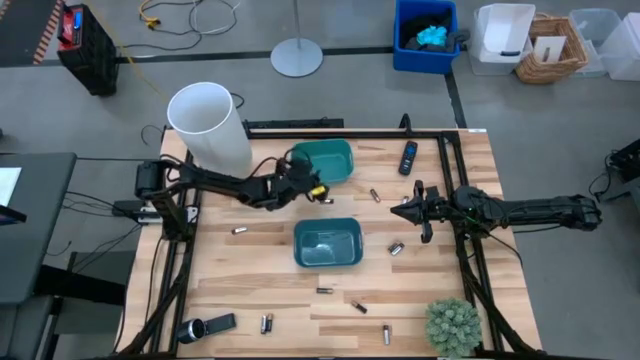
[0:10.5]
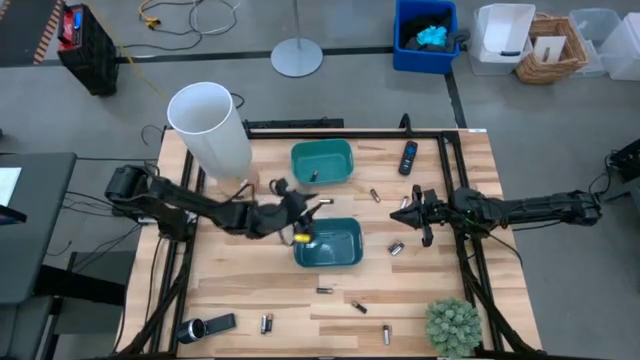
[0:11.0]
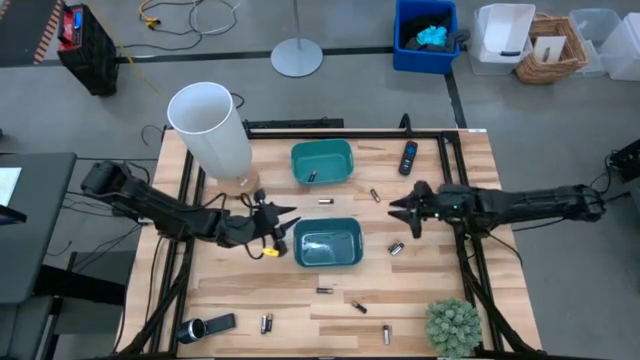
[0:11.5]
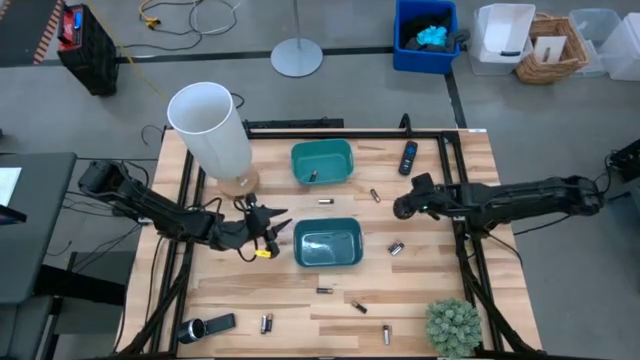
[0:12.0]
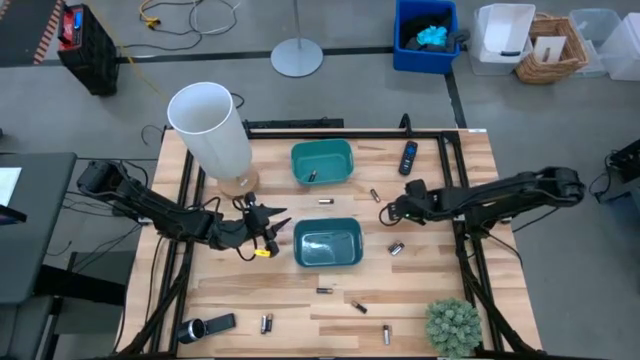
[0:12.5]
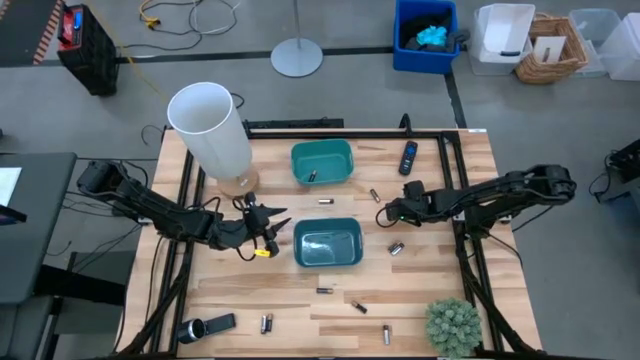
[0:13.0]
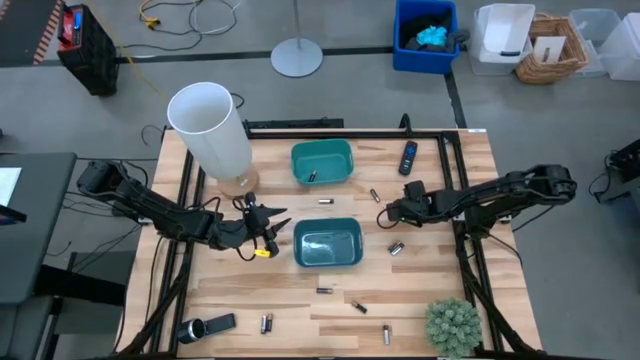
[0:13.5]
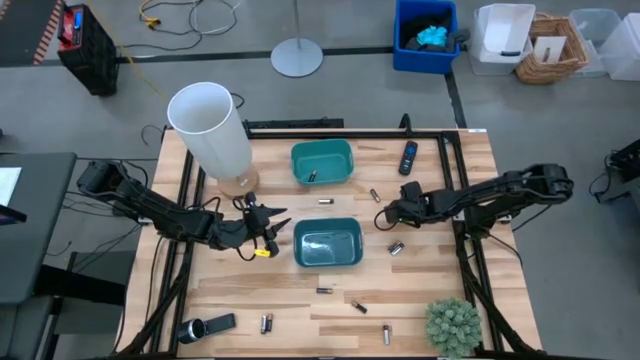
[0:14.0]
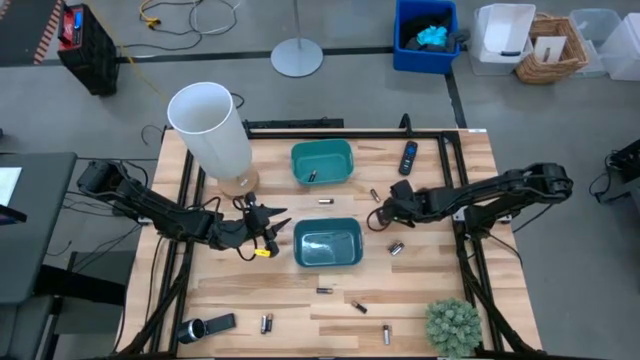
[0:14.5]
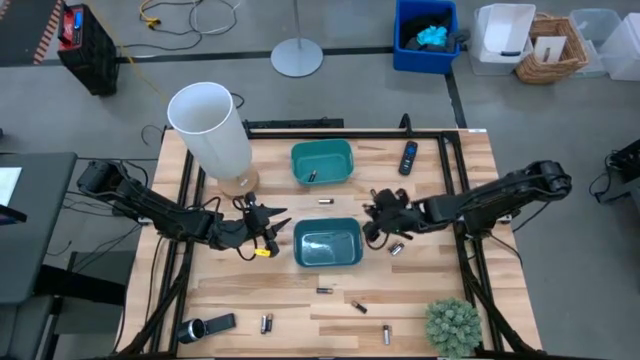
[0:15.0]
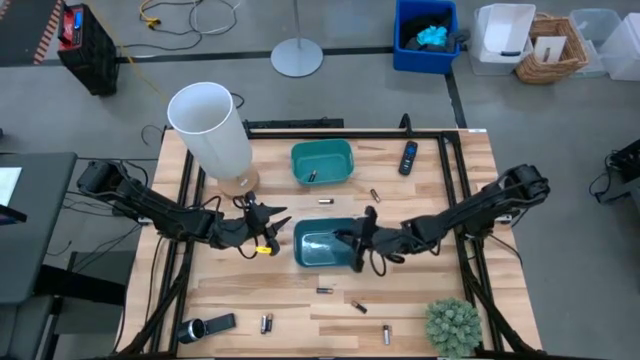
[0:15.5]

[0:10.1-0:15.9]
Task: Sort batteries
Put the silver battery into the blue bin

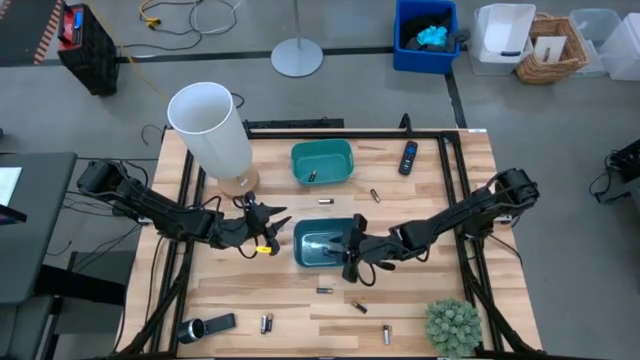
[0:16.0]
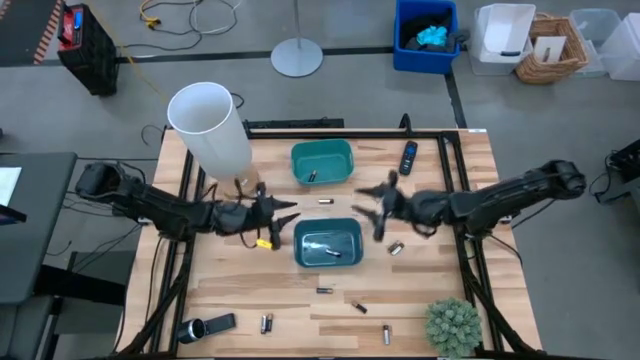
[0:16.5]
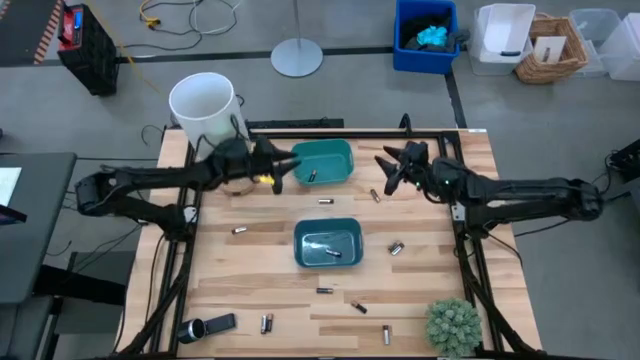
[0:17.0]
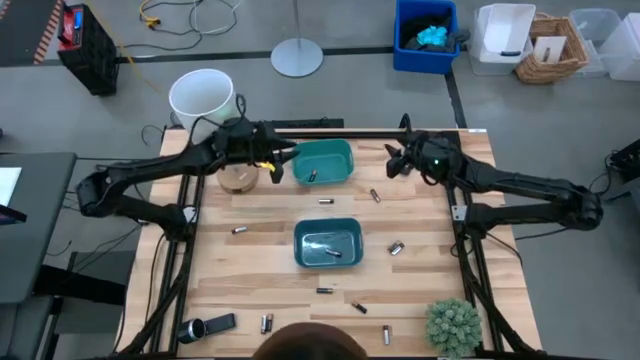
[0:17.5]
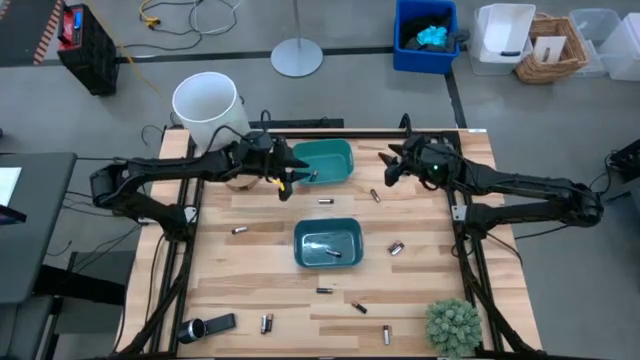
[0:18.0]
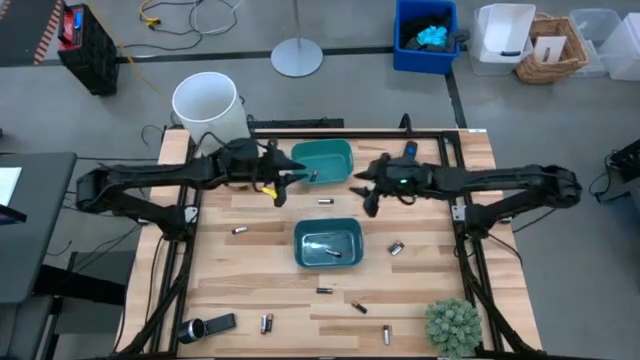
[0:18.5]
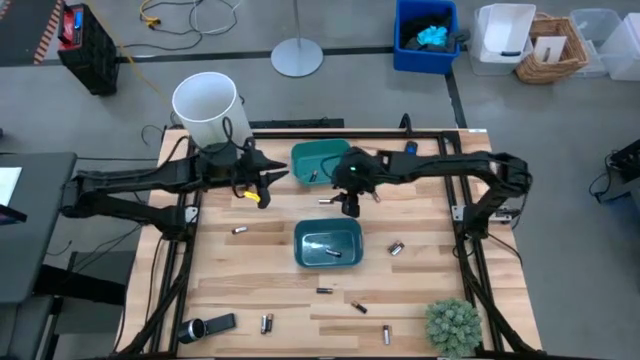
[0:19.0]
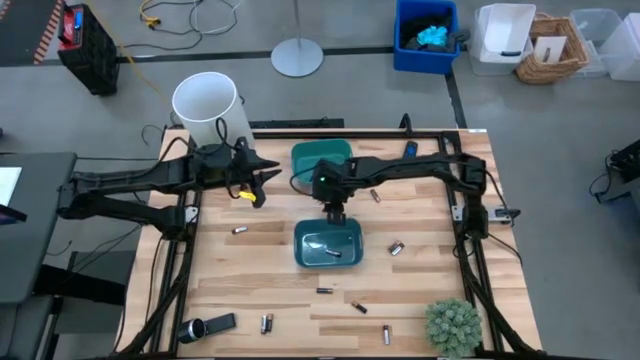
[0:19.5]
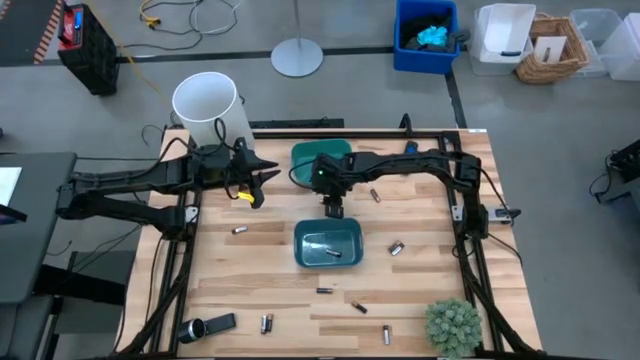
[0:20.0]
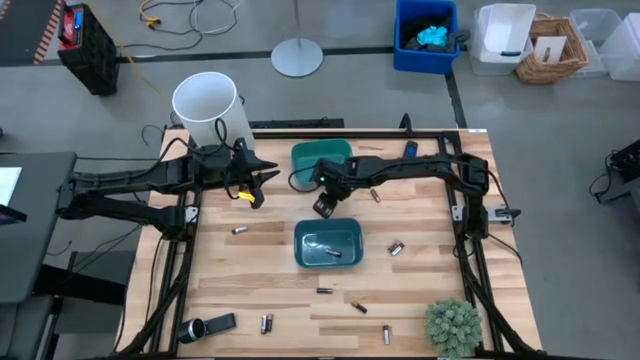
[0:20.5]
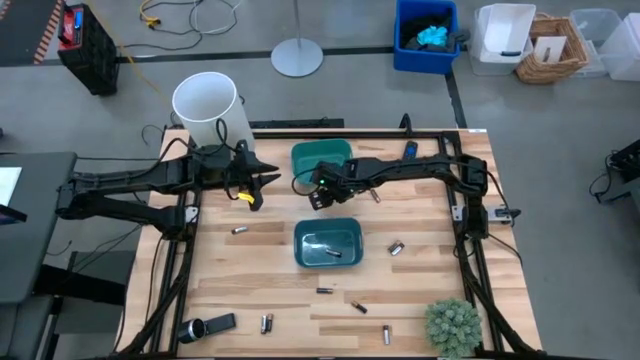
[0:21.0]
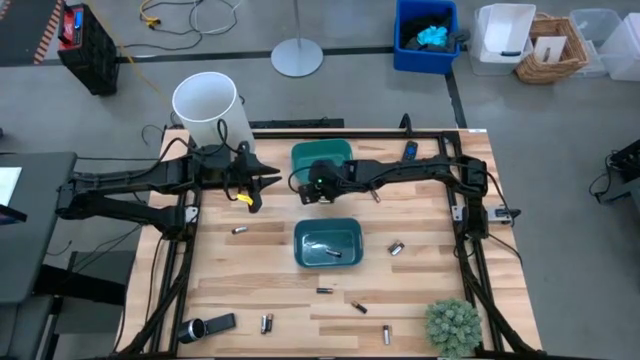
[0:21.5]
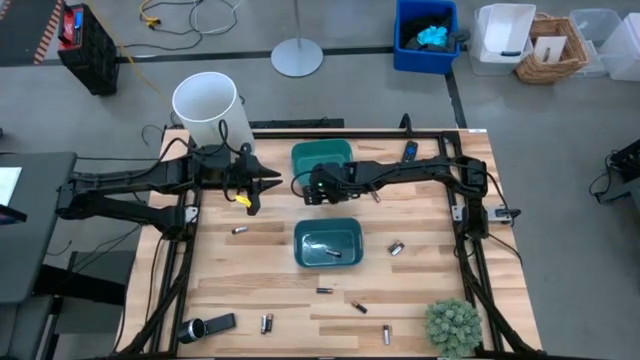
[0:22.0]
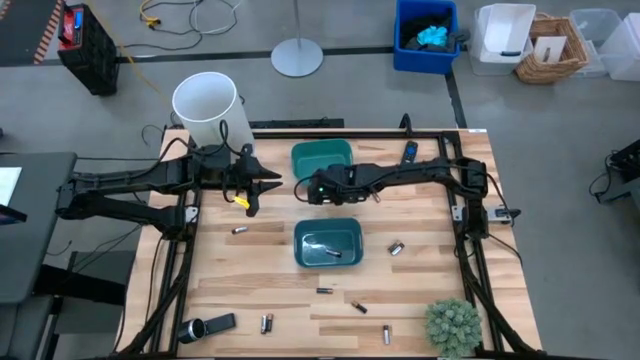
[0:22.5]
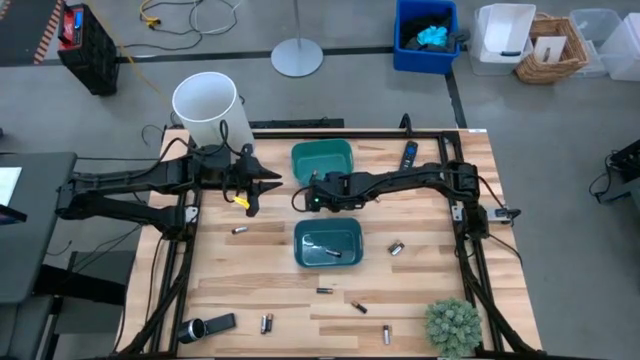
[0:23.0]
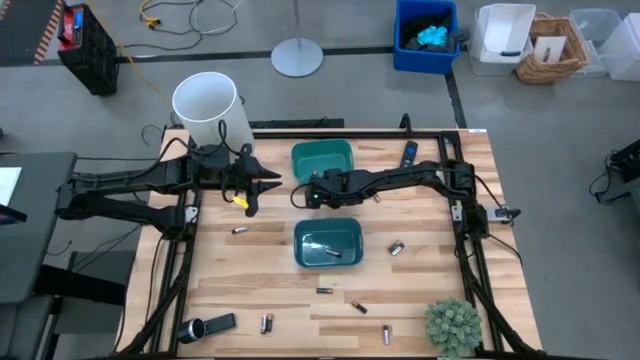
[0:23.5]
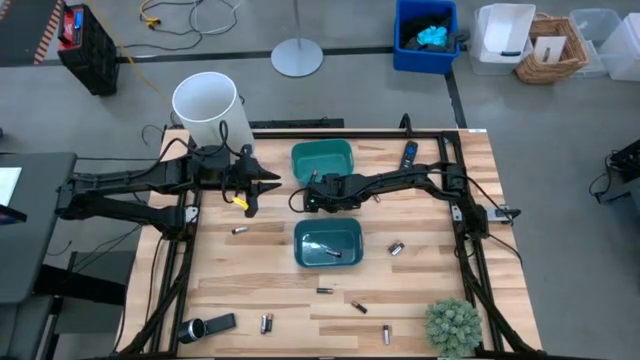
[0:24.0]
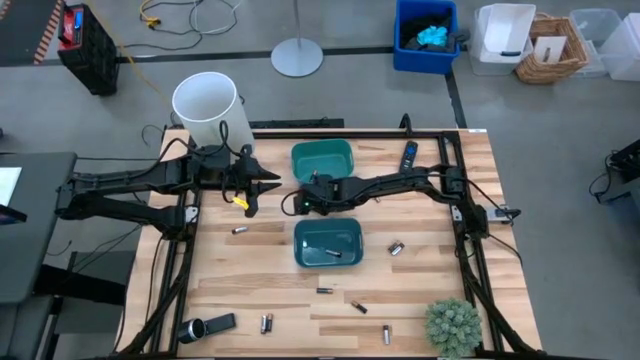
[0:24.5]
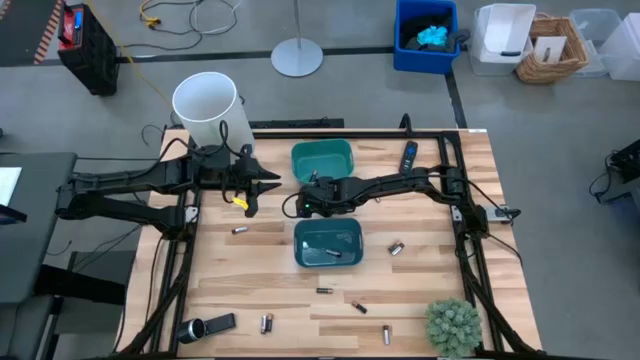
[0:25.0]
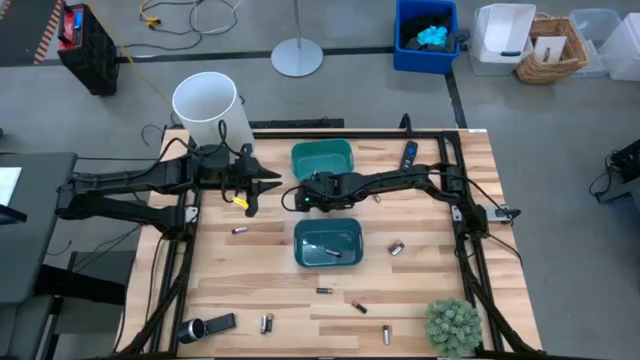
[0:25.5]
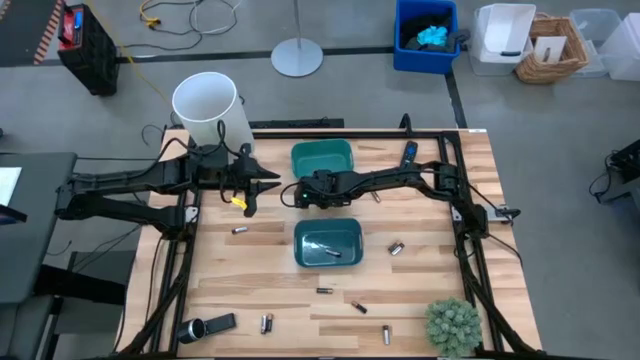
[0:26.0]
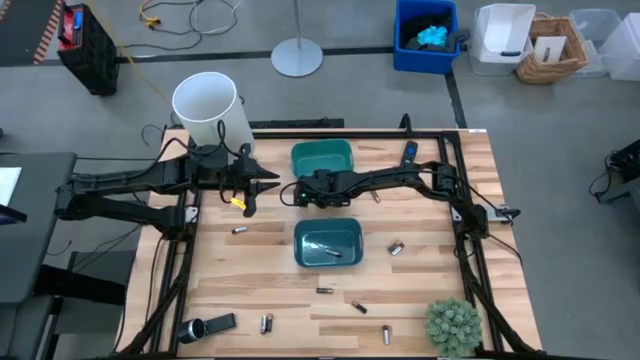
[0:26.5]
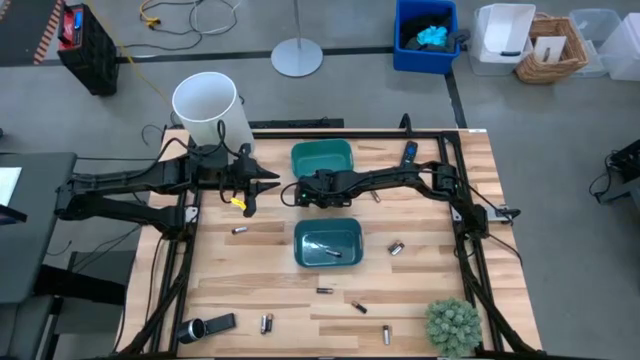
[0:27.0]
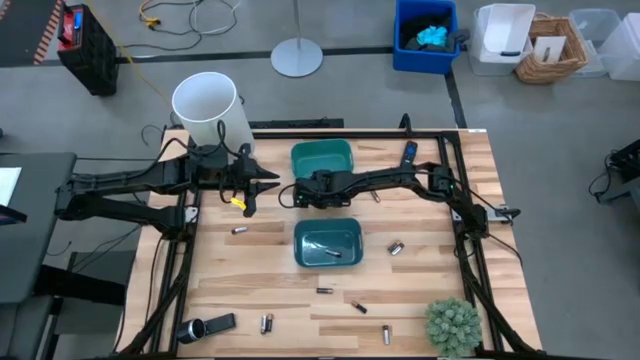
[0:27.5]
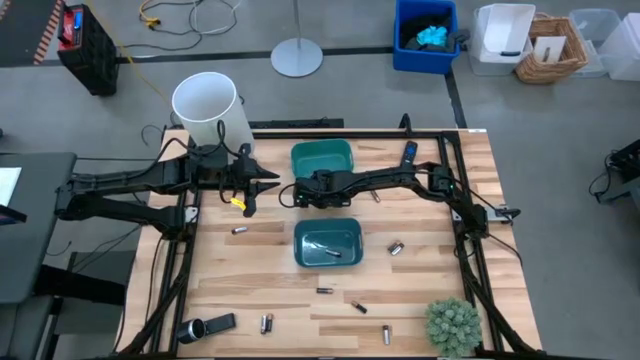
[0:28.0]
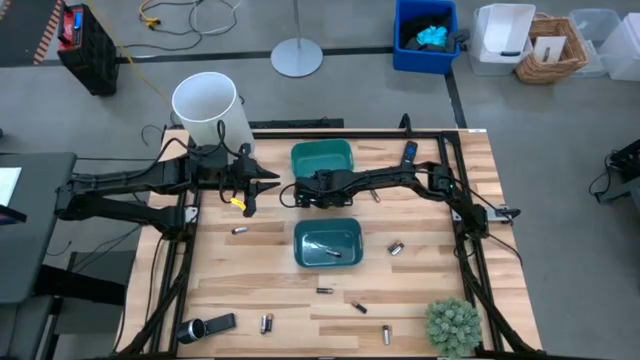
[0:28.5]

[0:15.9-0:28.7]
Put the silver battery into the blue bin

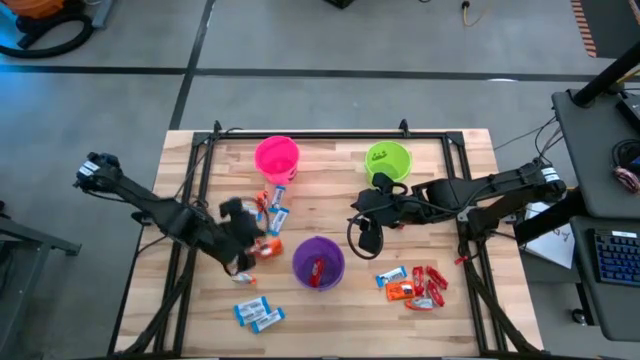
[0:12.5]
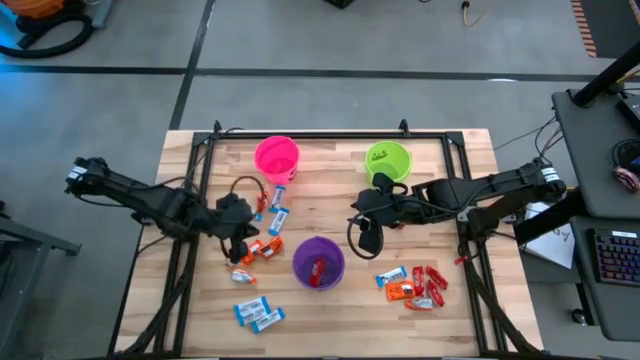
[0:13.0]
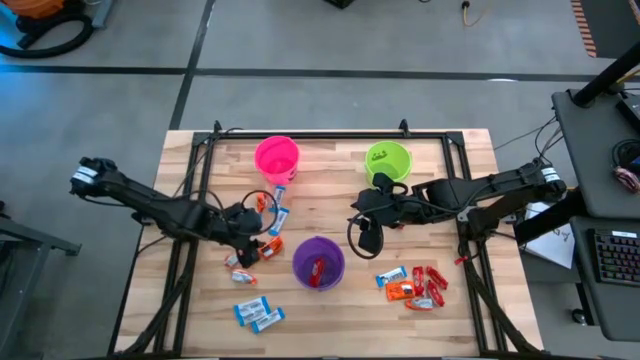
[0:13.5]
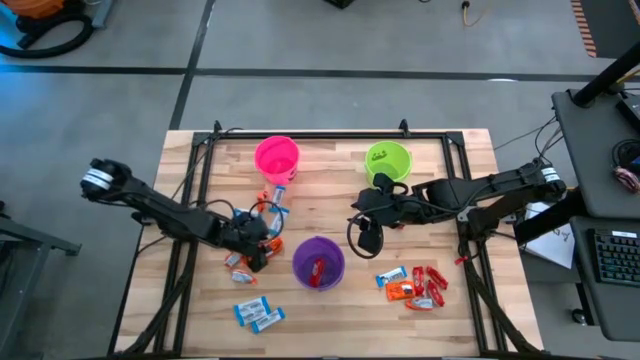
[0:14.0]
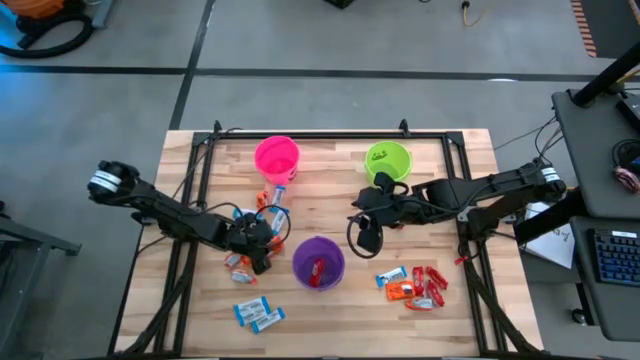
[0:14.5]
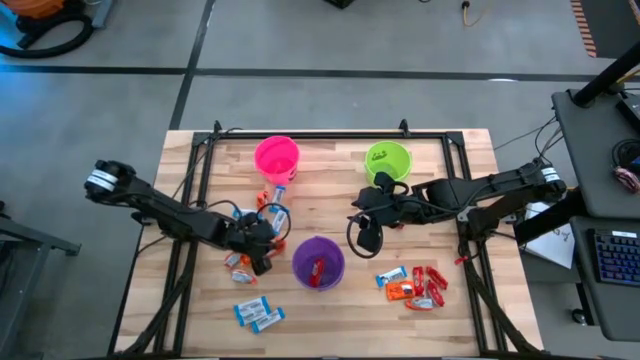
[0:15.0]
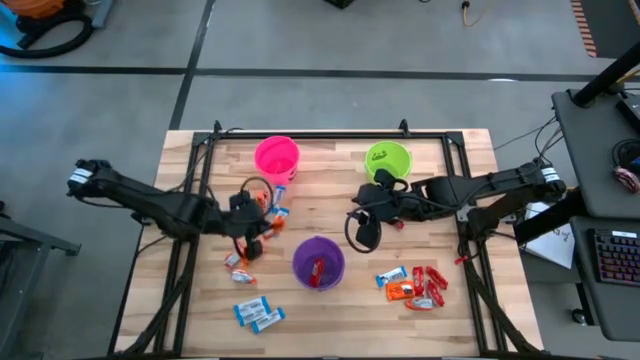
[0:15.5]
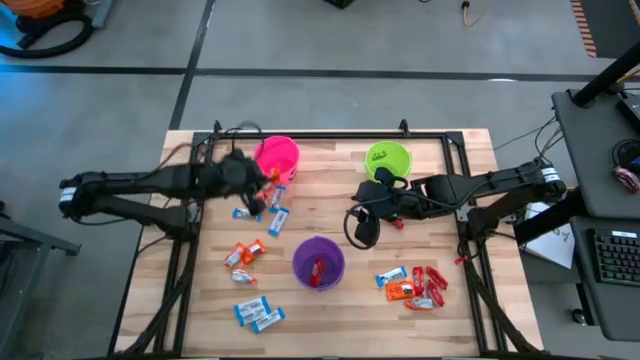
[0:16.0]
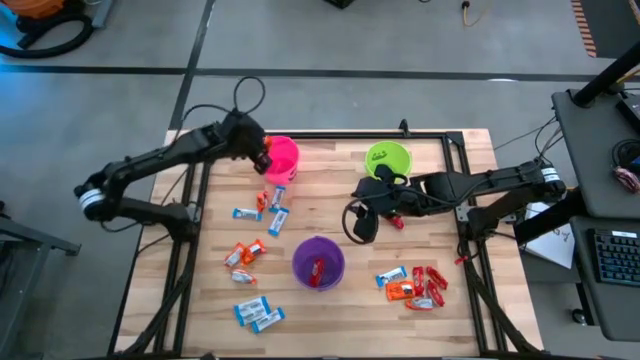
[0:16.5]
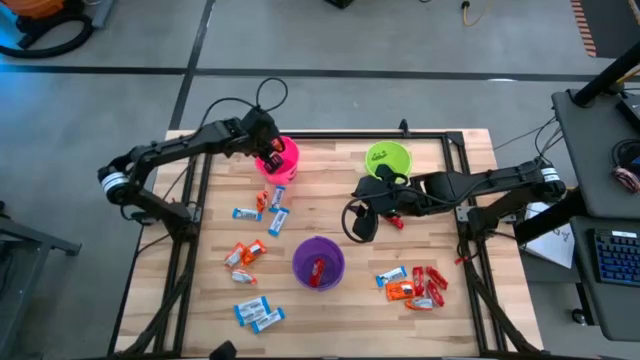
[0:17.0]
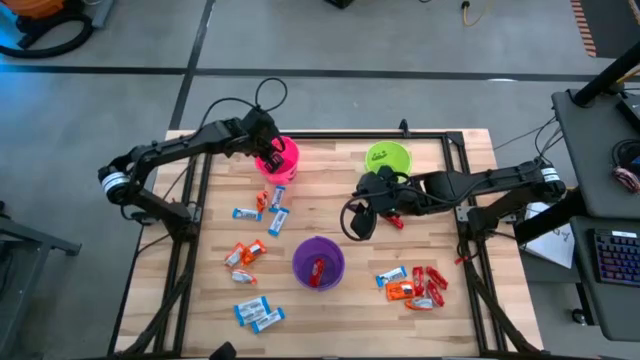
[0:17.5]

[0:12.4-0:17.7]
Task: Sort candy
Put the orange chocolate into the pink bucket
